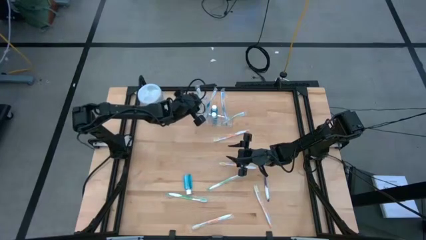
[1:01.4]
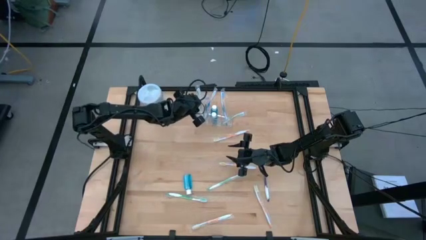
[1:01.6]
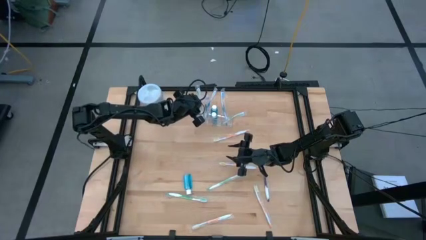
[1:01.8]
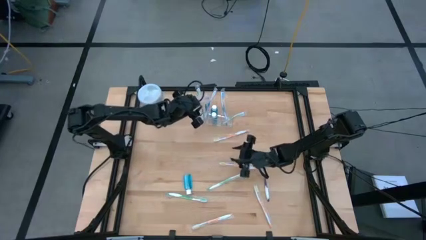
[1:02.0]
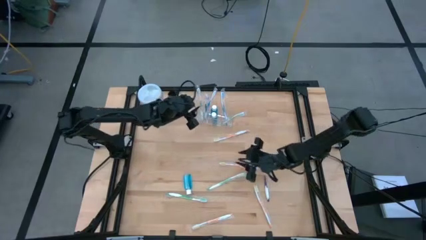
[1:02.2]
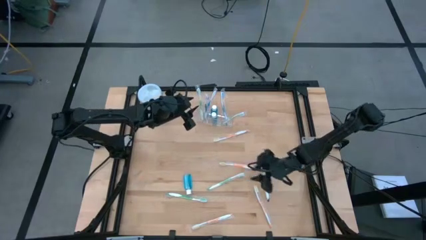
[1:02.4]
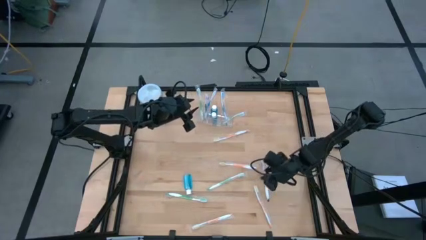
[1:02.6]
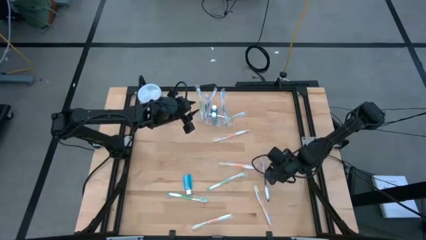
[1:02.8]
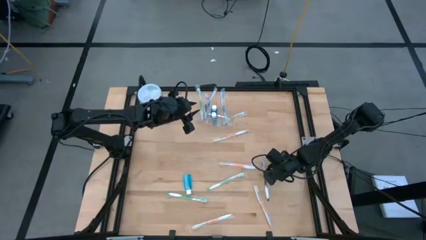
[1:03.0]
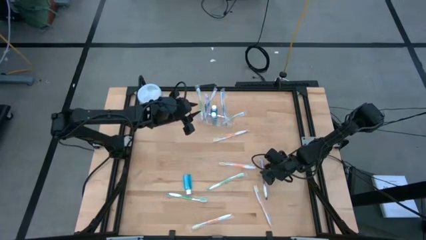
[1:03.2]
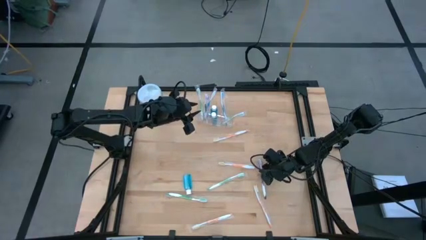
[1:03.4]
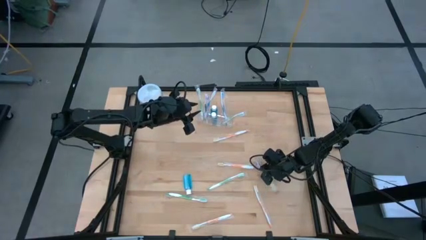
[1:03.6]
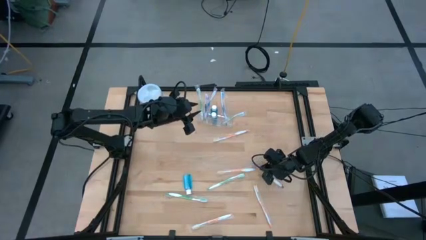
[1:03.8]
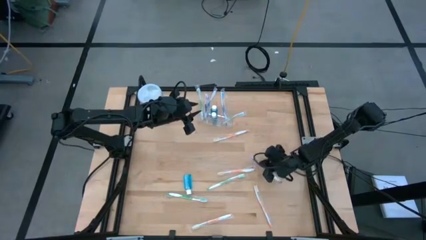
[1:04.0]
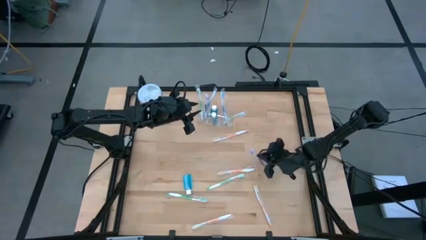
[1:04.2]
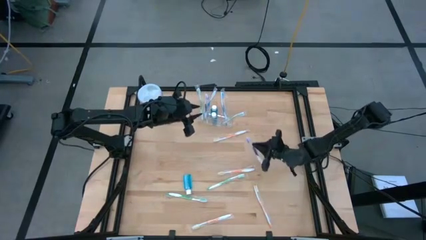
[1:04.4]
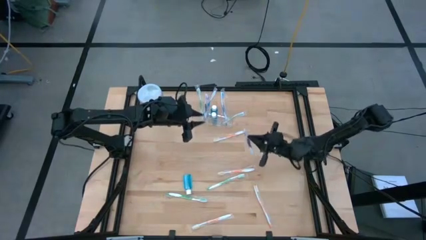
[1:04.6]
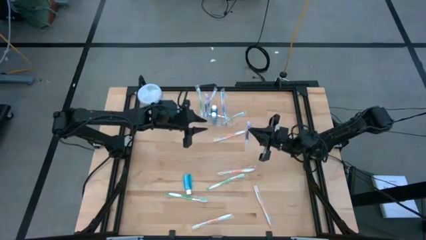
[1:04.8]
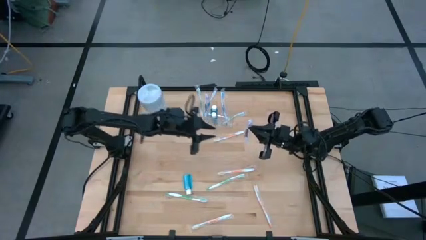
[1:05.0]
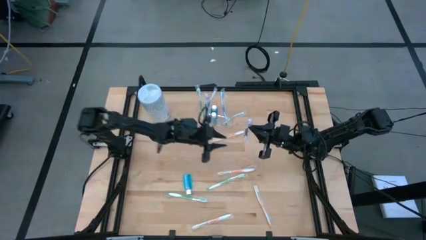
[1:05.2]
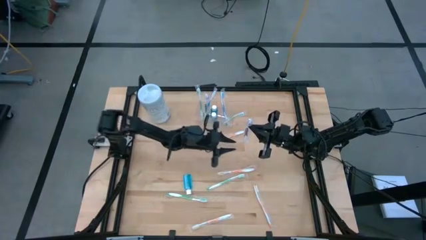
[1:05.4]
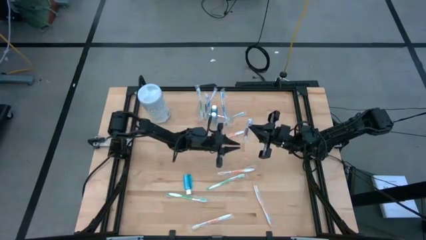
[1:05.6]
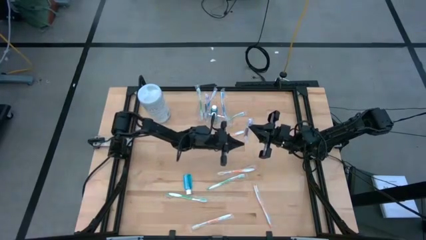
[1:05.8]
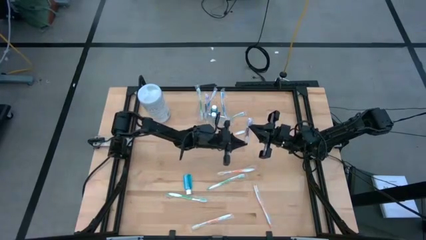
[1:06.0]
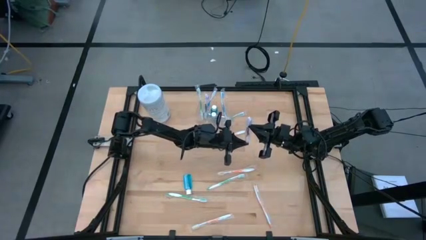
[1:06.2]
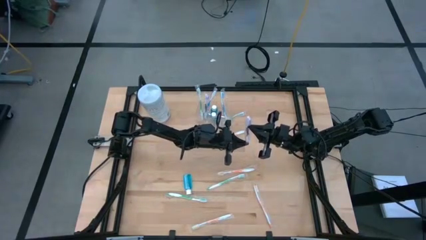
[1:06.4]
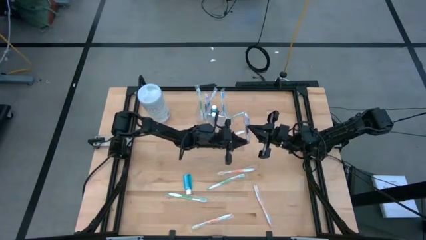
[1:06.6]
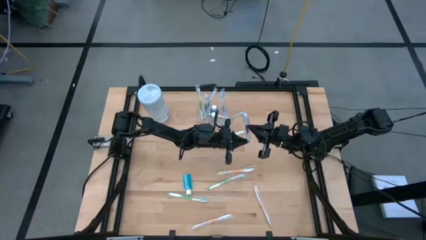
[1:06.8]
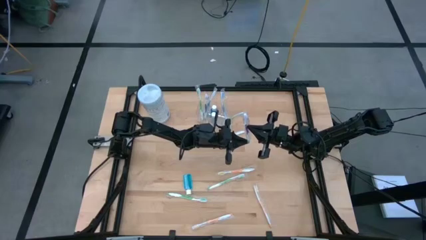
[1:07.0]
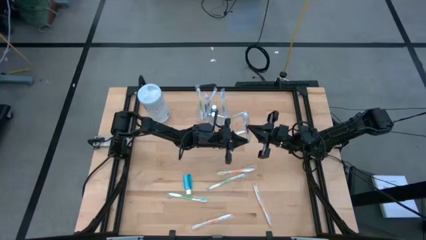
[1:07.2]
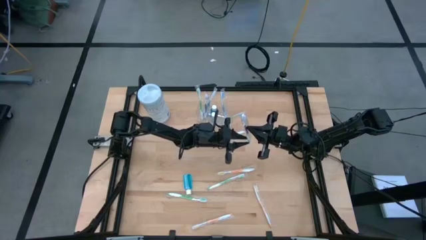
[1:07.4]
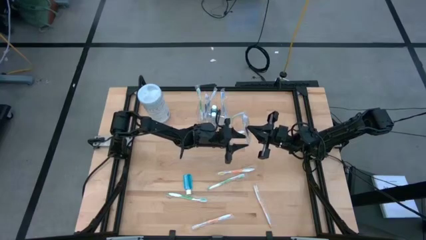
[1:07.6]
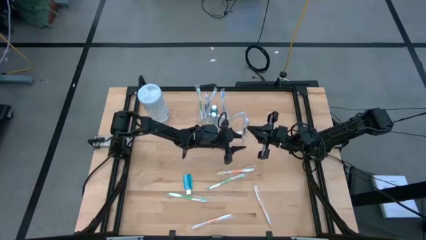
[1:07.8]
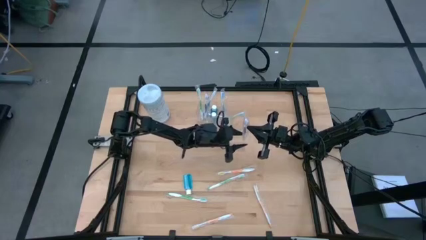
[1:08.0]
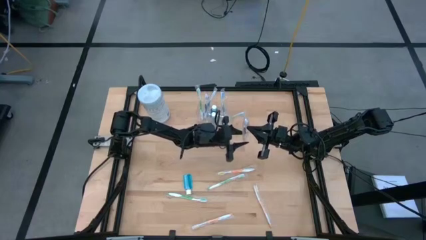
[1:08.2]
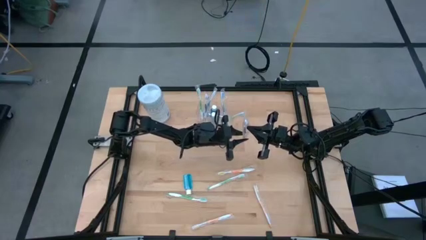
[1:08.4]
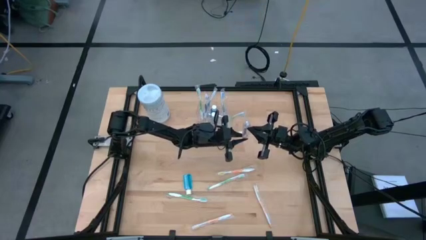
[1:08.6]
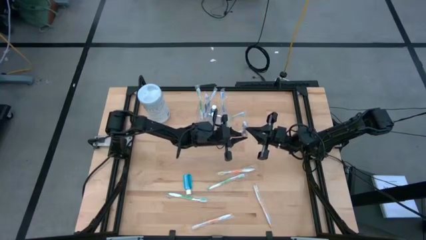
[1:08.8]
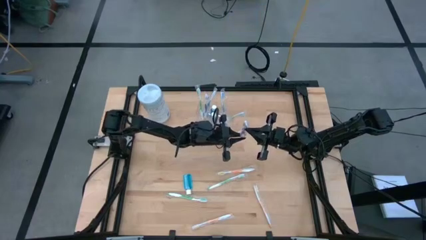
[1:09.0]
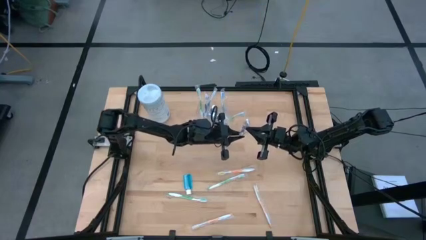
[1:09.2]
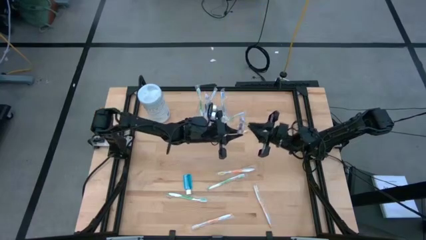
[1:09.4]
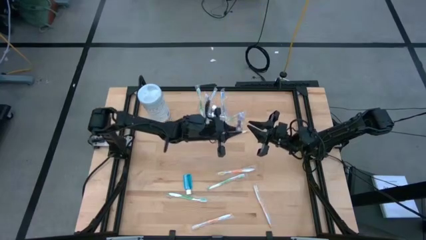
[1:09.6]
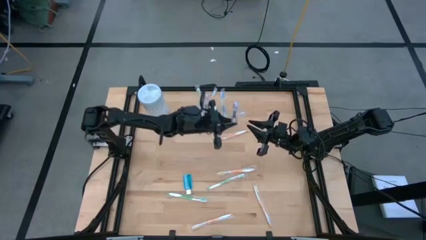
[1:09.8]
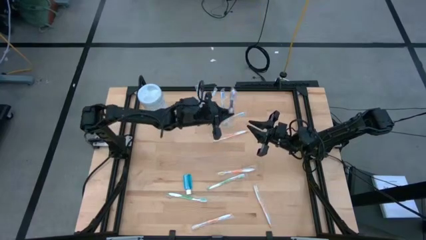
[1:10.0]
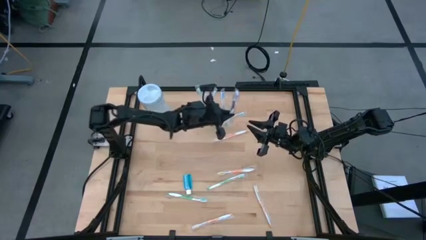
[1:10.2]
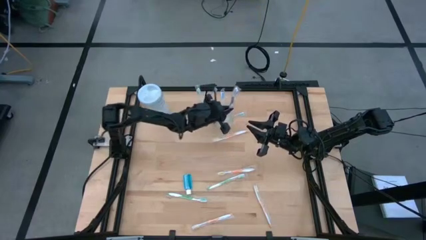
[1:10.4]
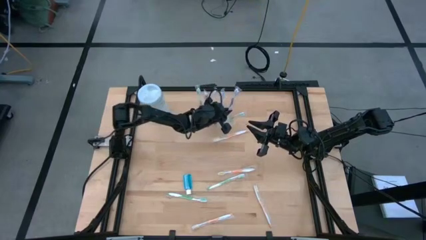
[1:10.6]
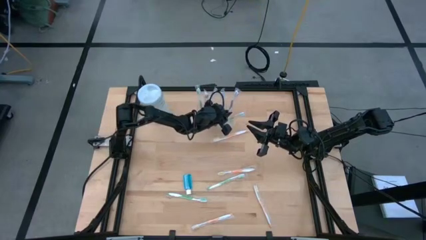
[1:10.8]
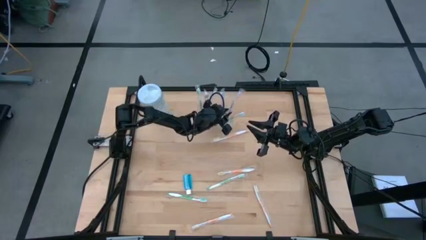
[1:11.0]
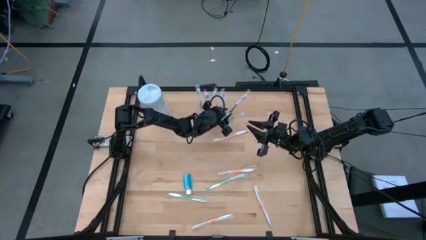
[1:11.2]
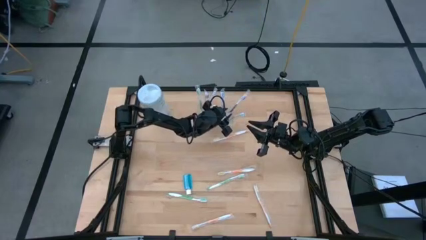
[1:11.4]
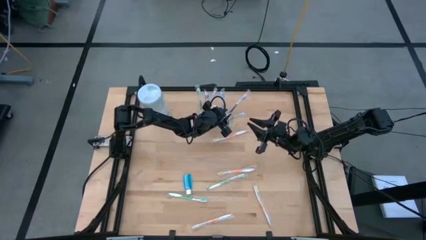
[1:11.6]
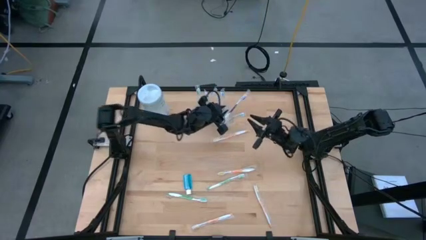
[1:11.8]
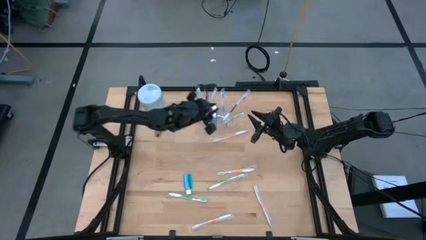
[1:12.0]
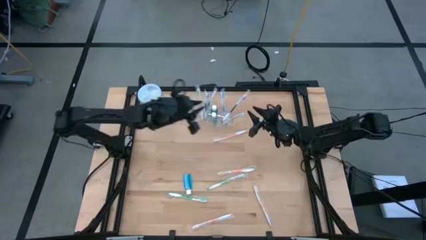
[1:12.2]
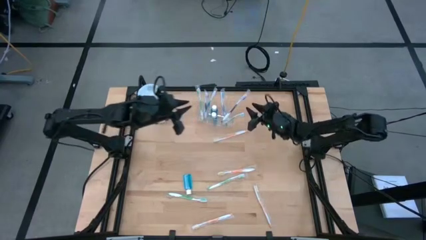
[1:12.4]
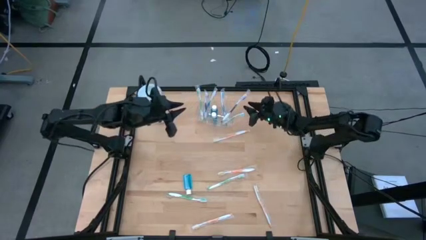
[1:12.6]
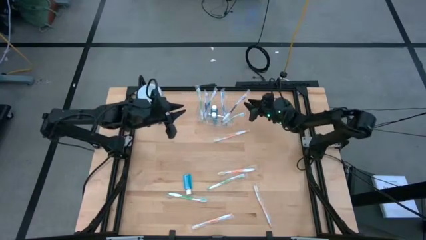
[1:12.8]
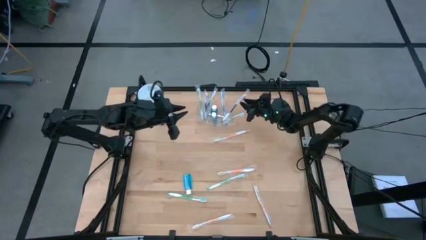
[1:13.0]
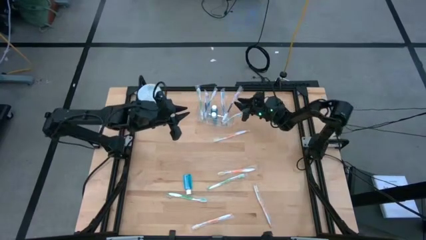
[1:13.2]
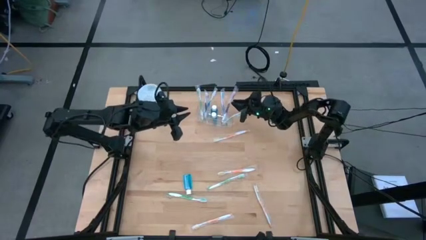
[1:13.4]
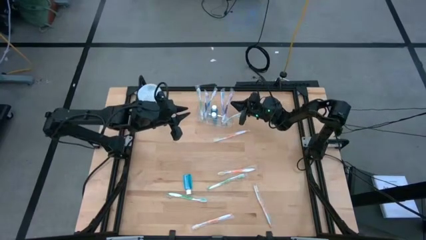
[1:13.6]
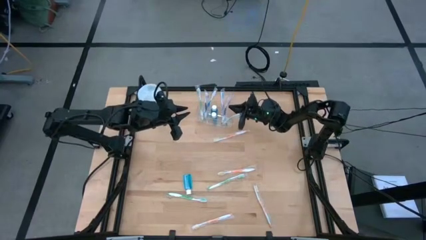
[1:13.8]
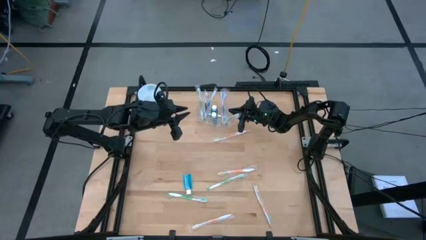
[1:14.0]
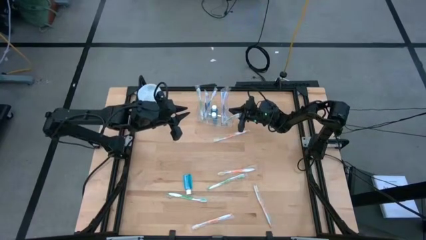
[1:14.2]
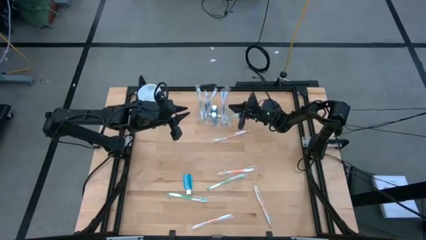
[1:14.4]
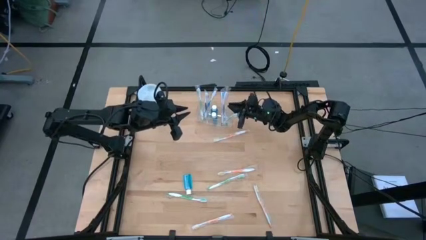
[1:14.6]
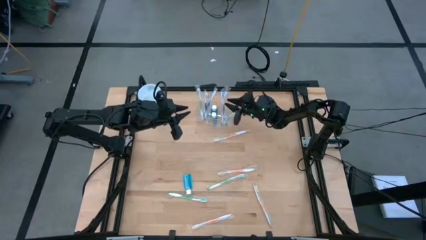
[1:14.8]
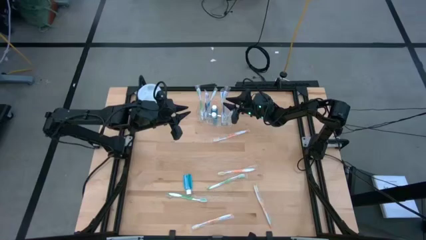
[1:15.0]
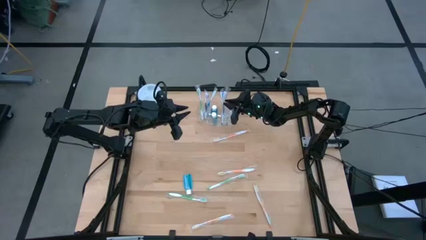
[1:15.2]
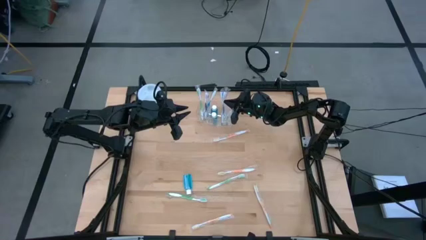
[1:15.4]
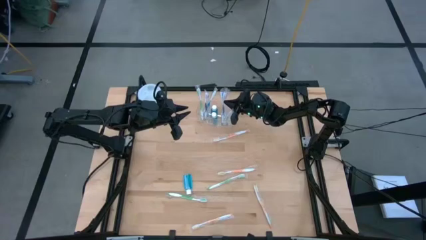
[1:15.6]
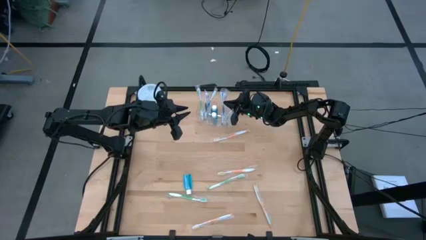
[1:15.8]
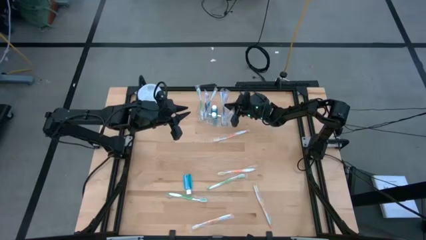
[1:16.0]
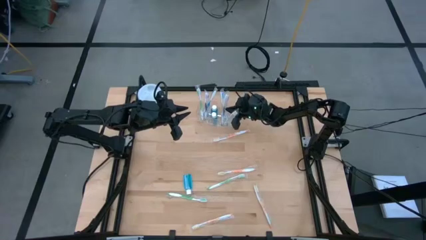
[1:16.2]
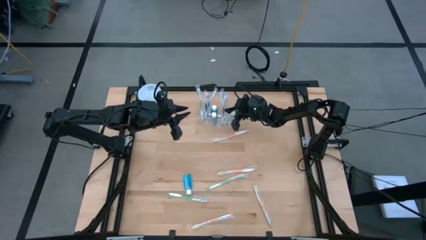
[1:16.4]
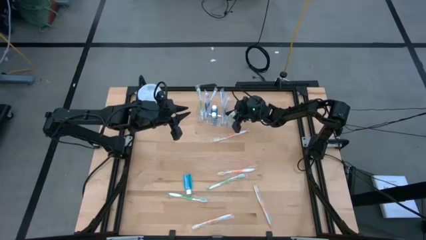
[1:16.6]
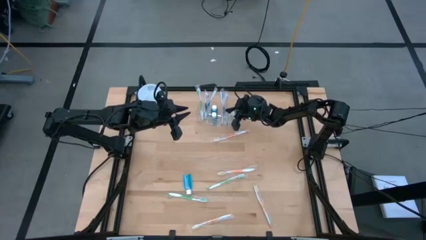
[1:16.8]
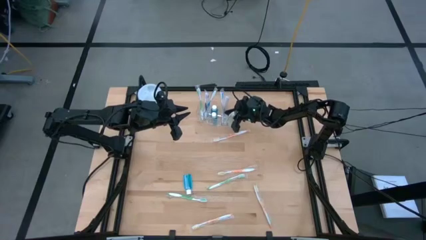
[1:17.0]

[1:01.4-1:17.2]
Task: Pick & Place toothbrushing station
Put the purple toothbrush into the transparent organizer
